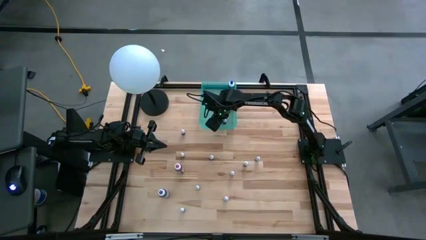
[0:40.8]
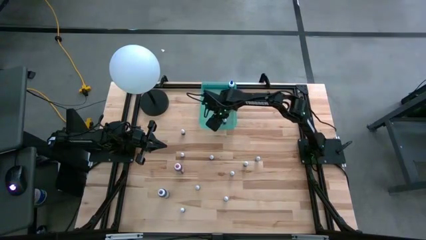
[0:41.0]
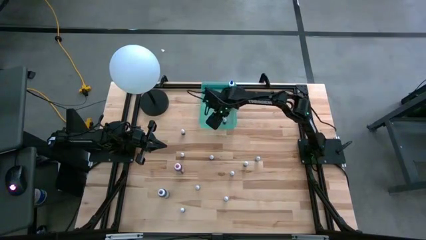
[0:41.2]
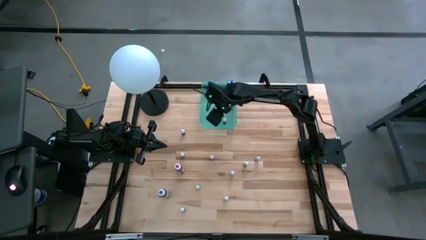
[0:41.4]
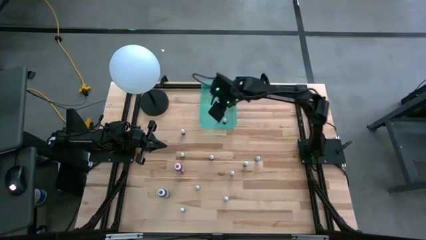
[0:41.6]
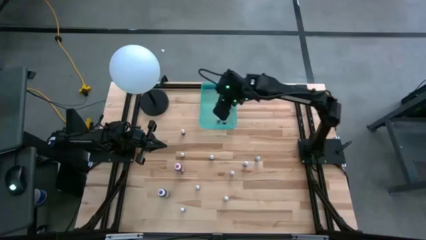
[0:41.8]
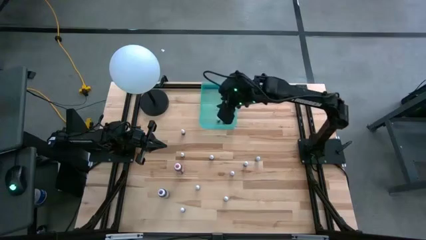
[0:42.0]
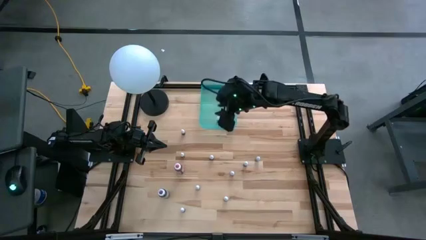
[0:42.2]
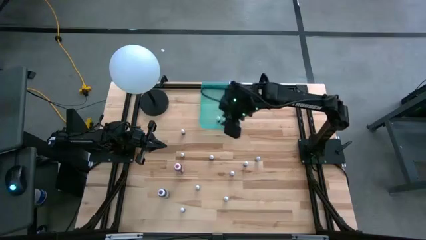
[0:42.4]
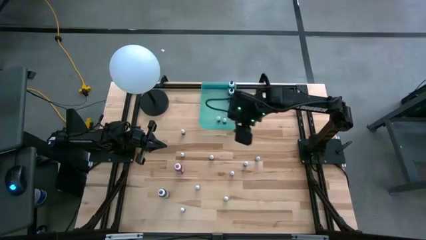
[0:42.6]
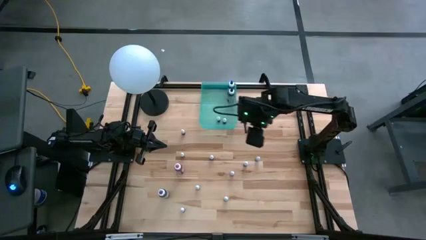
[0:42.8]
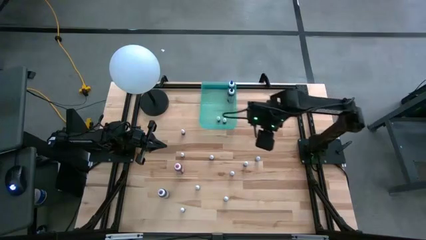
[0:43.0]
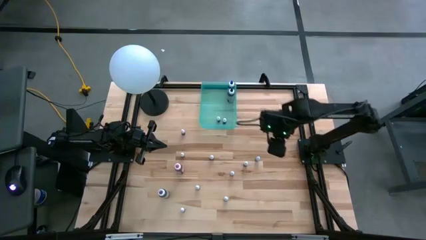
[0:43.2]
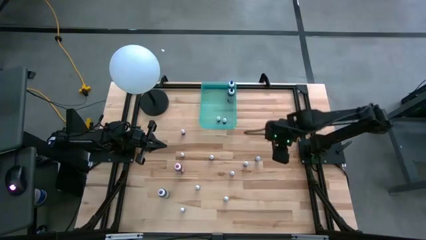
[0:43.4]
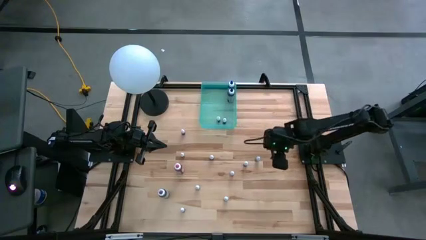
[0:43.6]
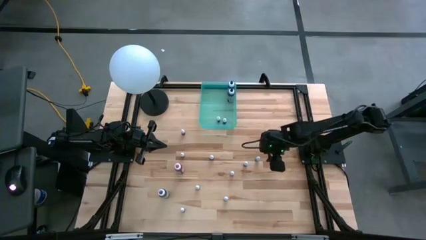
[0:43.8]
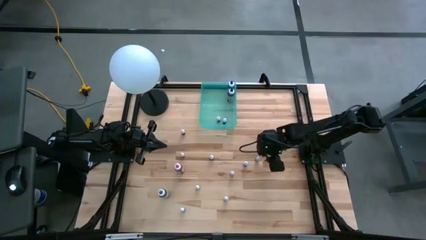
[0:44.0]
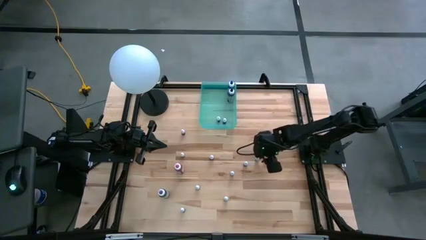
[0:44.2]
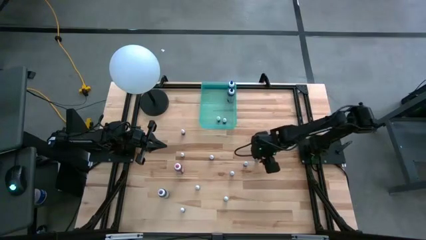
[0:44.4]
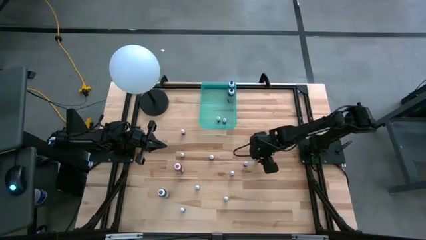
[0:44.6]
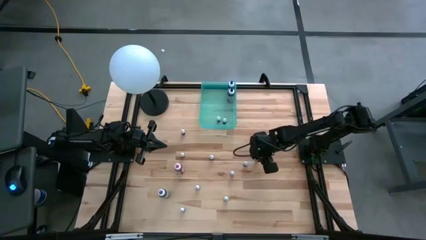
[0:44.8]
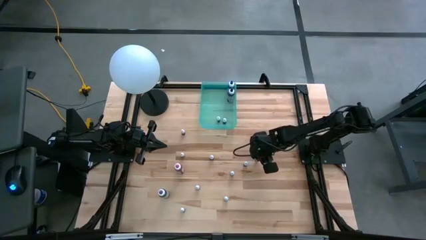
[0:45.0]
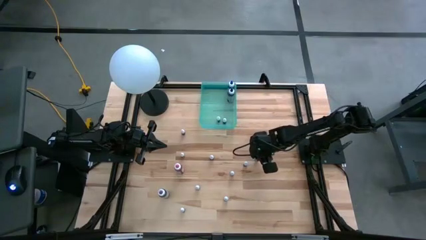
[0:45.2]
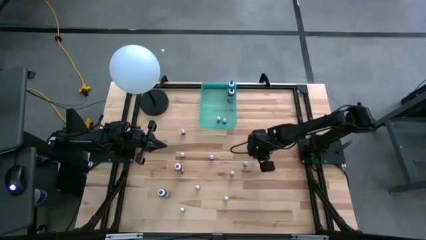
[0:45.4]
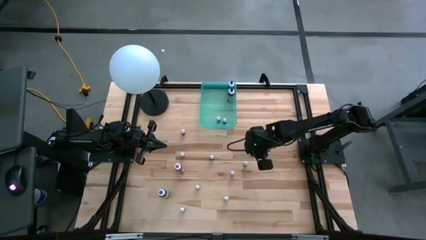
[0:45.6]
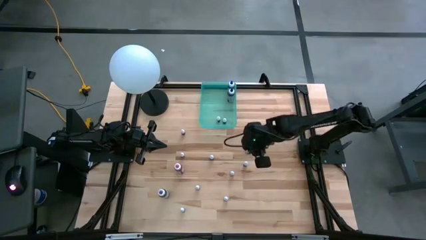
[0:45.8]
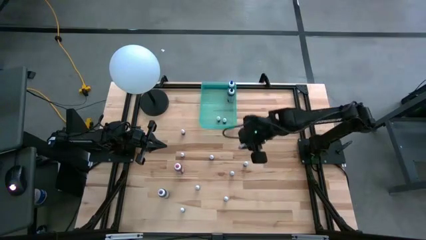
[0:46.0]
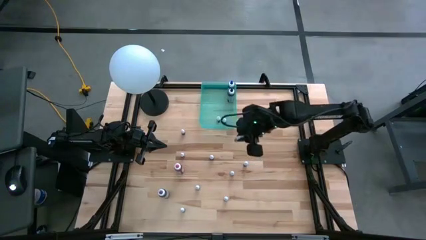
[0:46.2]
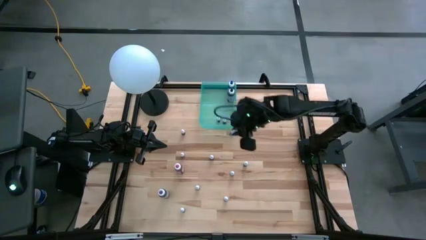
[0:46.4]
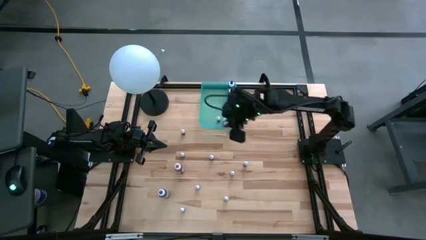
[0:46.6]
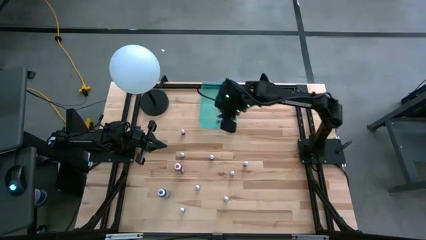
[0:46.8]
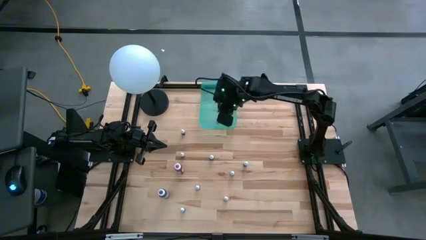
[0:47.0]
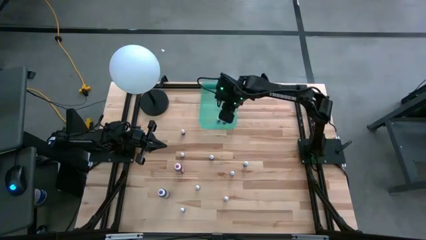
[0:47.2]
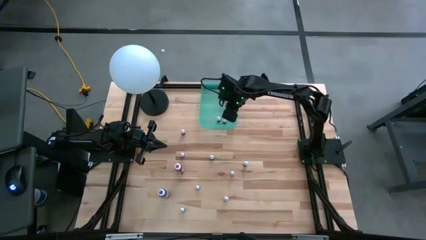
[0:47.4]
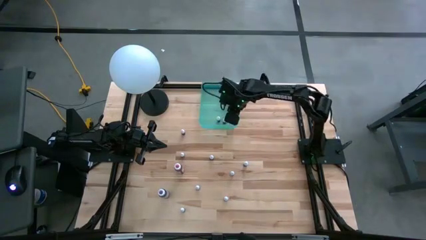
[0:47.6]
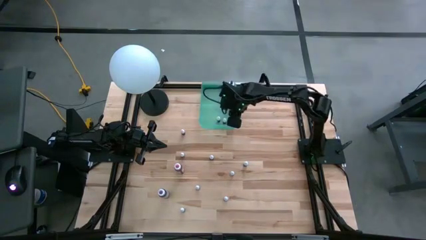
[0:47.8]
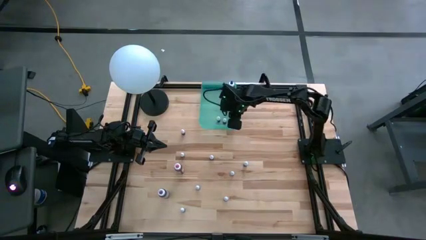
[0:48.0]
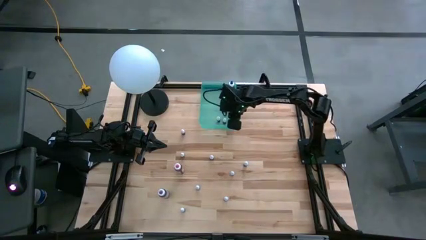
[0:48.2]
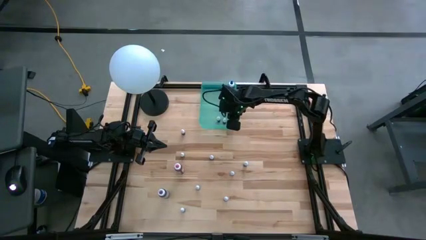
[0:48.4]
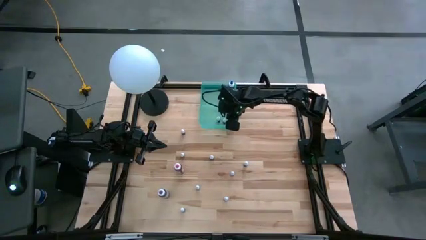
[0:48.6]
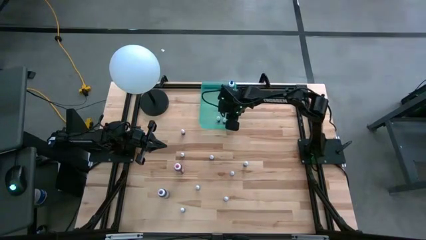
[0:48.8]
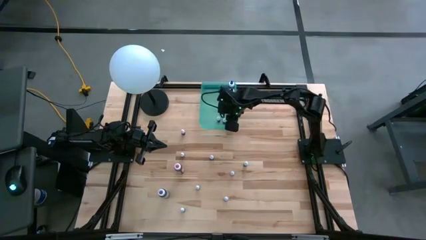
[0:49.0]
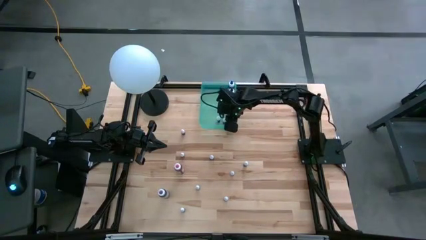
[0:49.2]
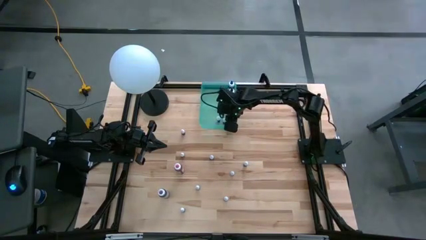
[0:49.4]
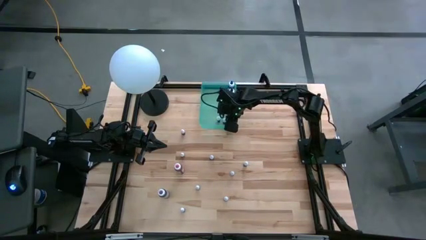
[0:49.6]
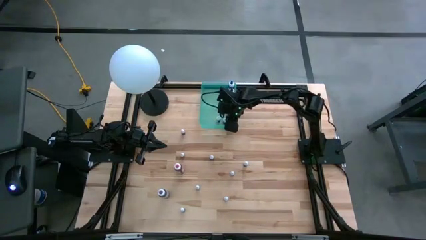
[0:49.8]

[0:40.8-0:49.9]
Task: Pick & Place food coloring
Put the small blue food coloring bottle into the light blue bin

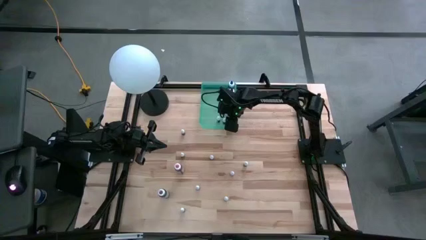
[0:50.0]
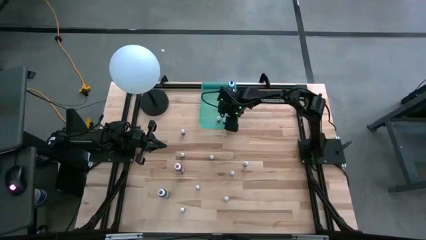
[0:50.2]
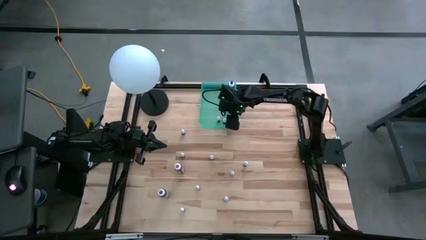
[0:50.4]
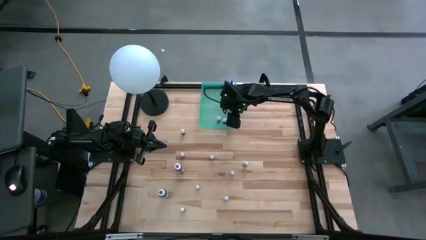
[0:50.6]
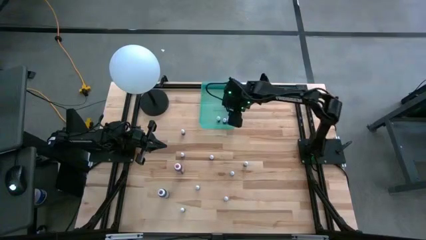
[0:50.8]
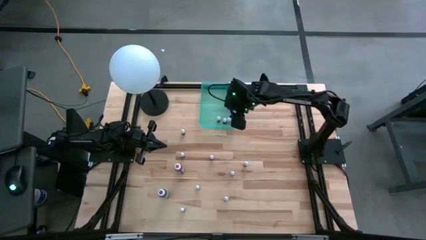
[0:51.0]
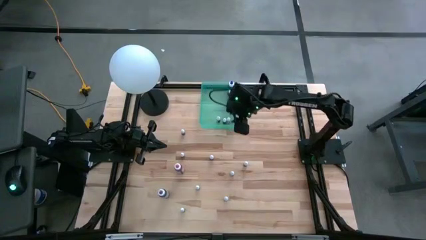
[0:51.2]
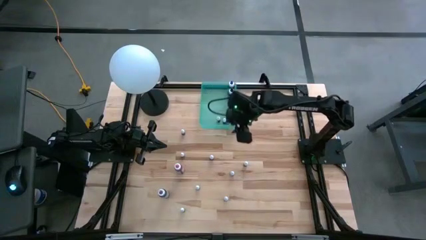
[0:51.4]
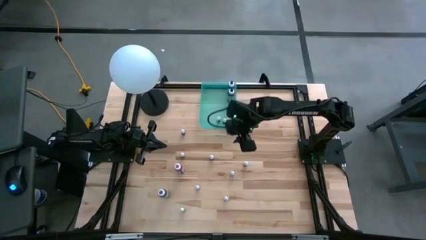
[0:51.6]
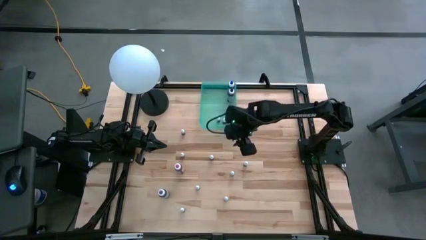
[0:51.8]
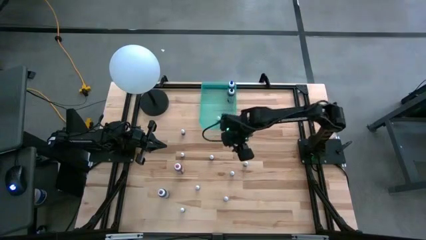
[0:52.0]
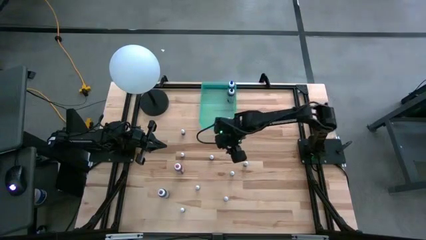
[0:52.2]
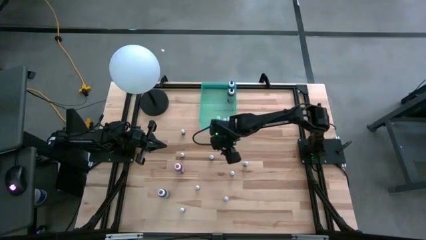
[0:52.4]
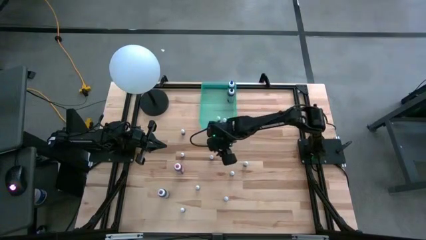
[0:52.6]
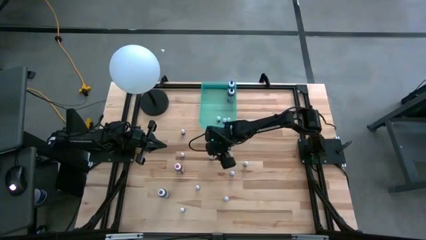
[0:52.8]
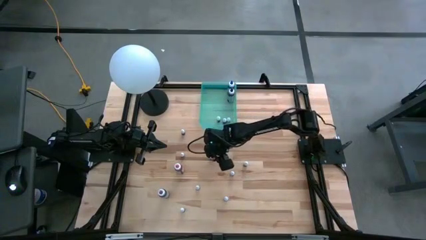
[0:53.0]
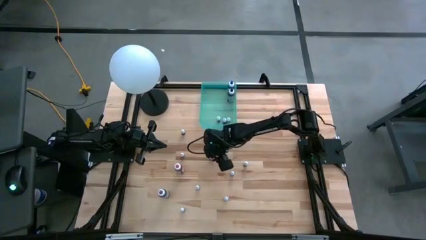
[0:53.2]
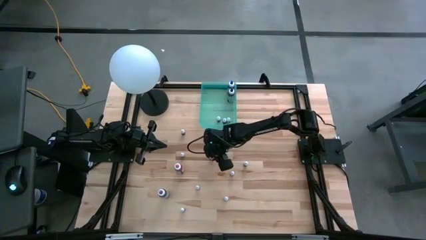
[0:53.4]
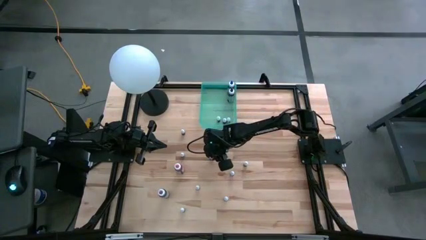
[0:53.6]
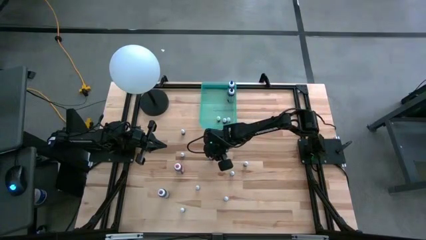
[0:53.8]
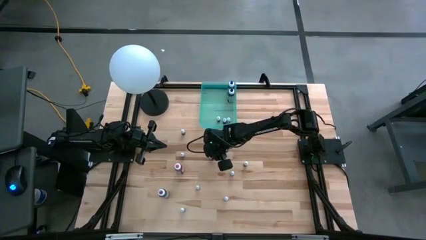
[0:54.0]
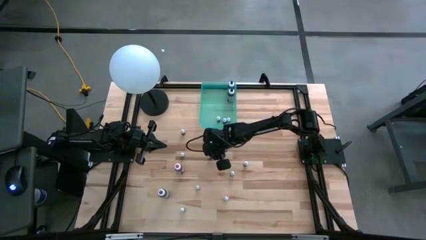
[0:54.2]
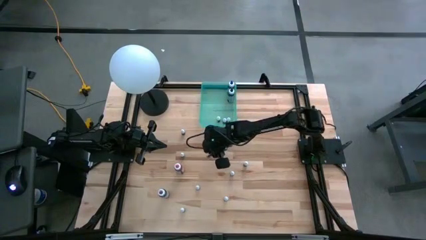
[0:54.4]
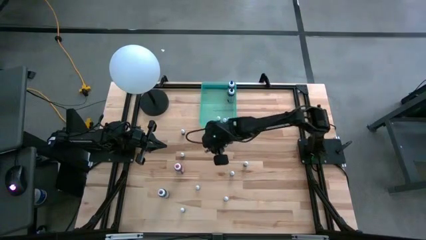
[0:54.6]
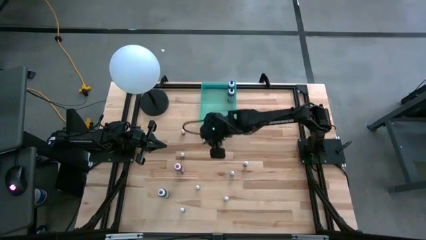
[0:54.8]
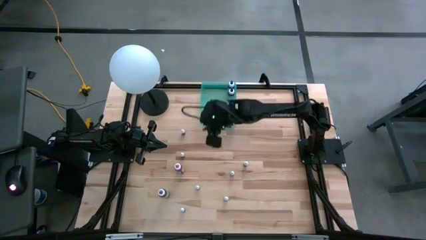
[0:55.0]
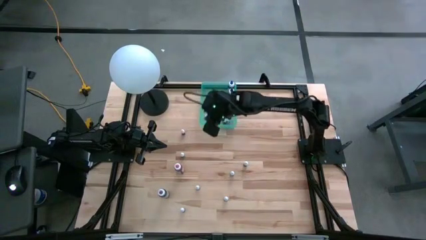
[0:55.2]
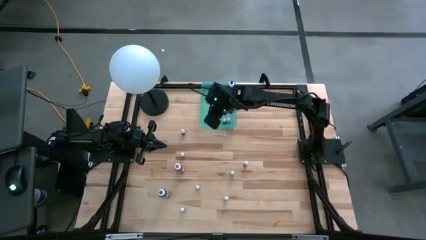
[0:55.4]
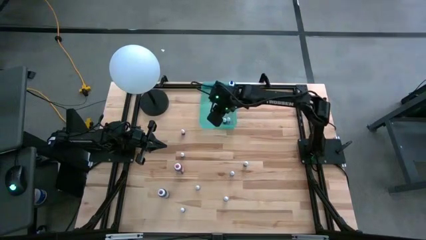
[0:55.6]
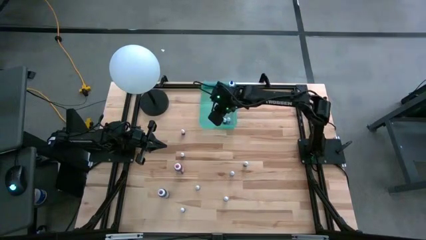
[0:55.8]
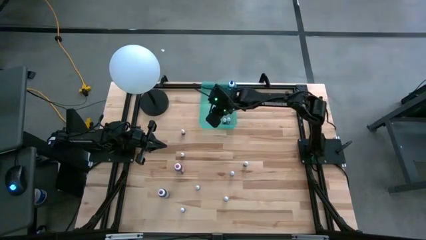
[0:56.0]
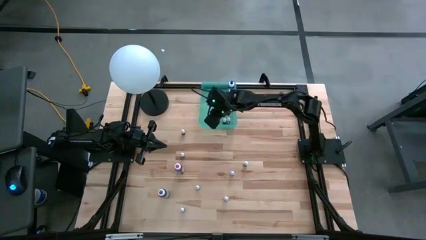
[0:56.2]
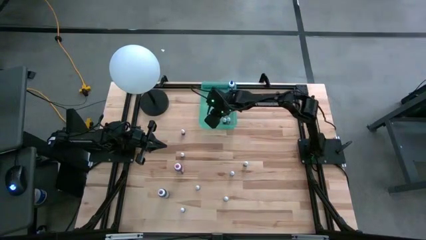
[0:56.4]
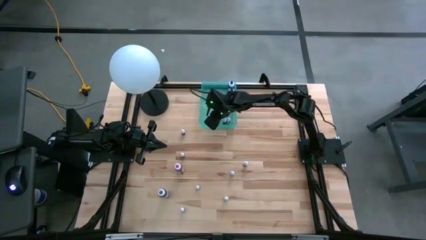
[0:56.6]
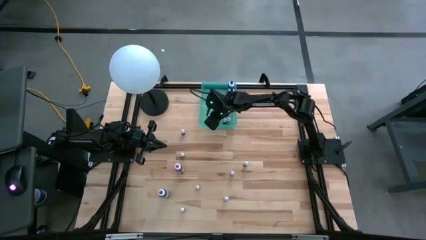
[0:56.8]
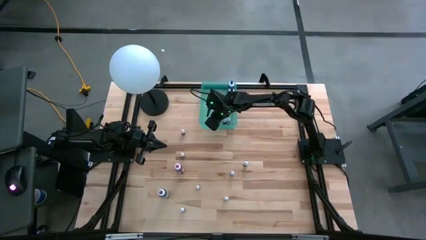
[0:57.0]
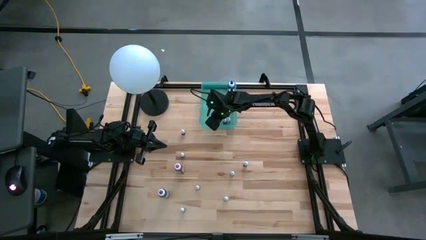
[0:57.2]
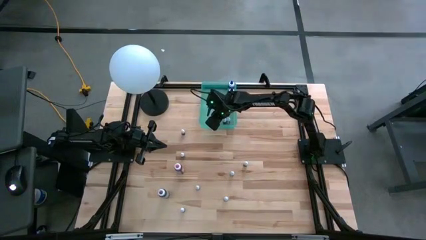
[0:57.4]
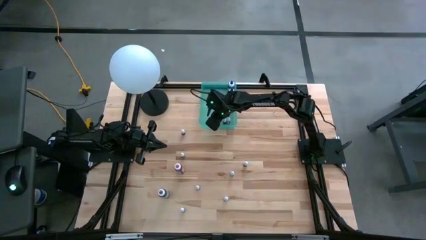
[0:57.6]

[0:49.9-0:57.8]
Put the small blue food coloring bottle into the light blue bin
